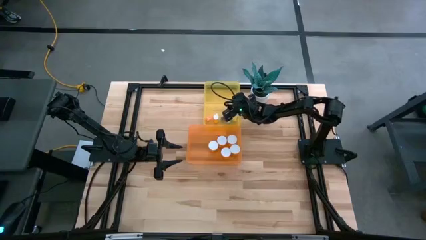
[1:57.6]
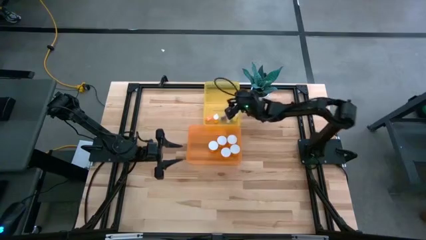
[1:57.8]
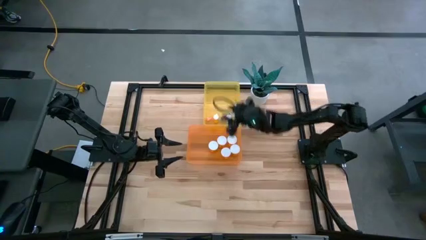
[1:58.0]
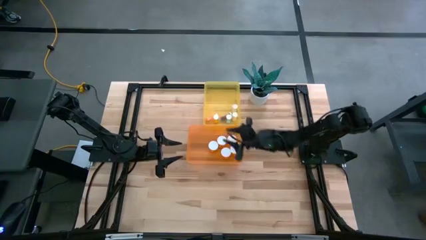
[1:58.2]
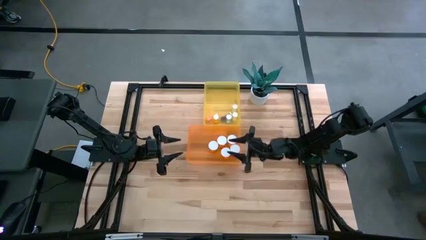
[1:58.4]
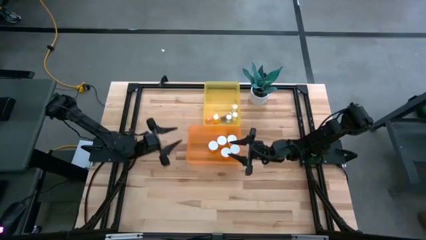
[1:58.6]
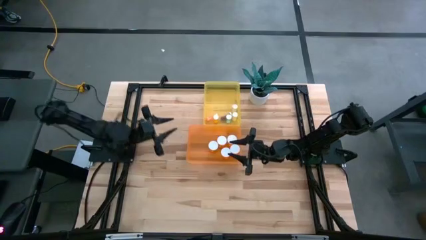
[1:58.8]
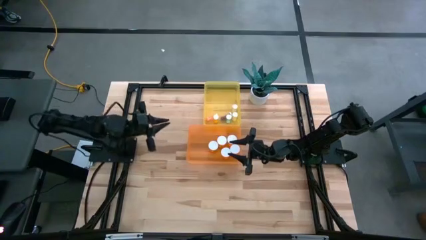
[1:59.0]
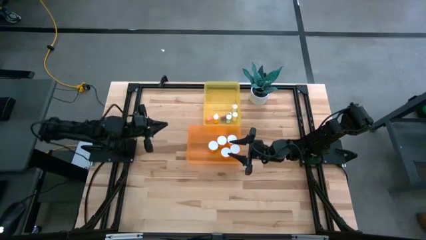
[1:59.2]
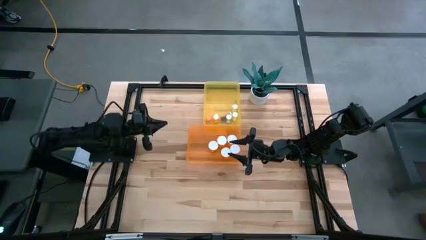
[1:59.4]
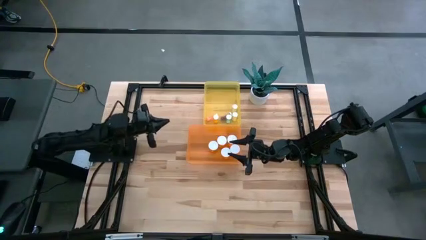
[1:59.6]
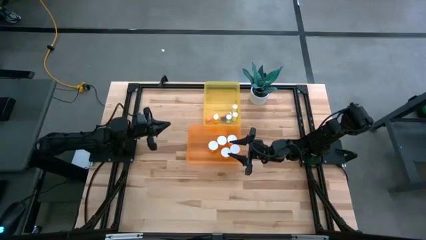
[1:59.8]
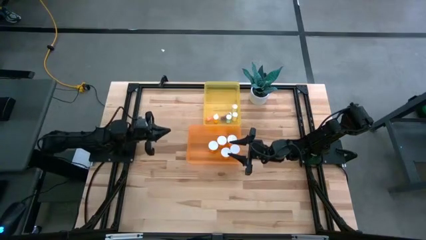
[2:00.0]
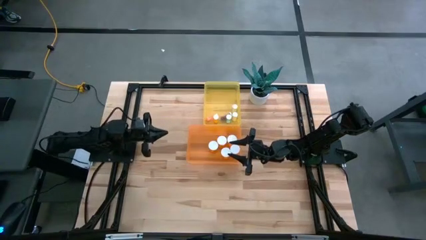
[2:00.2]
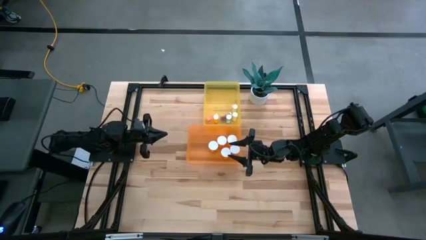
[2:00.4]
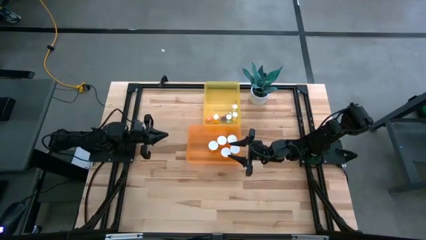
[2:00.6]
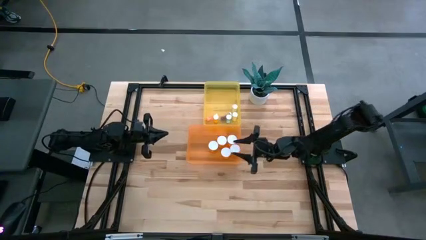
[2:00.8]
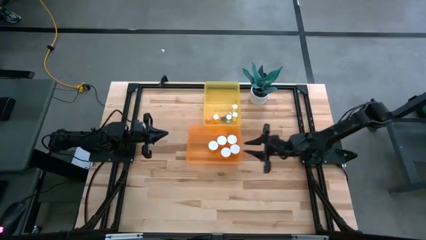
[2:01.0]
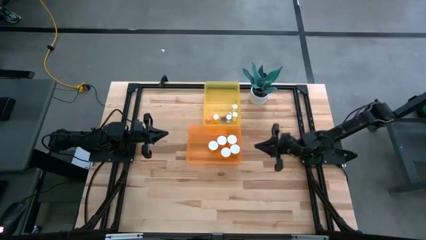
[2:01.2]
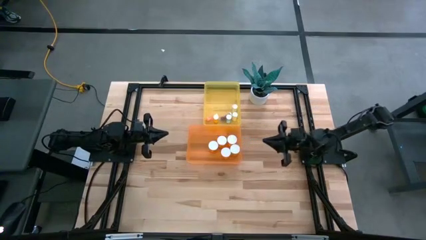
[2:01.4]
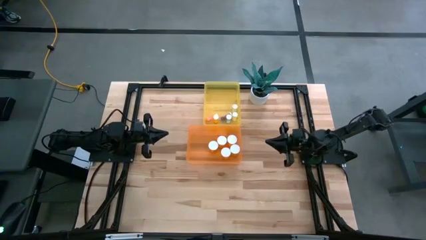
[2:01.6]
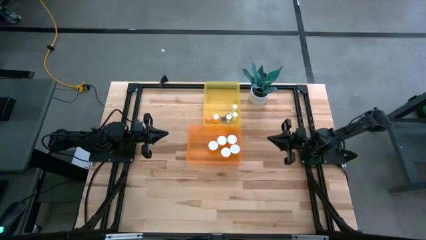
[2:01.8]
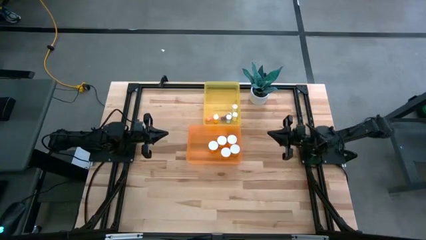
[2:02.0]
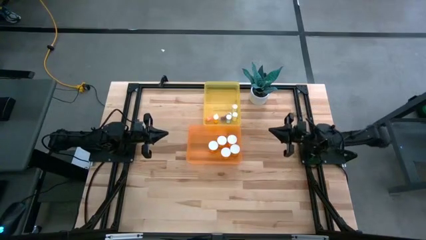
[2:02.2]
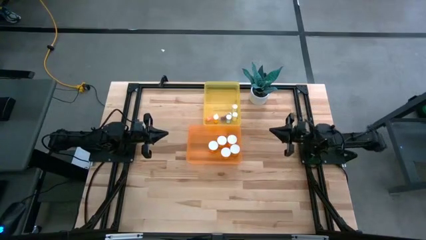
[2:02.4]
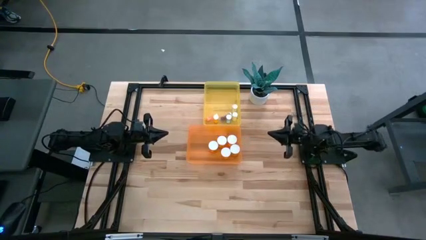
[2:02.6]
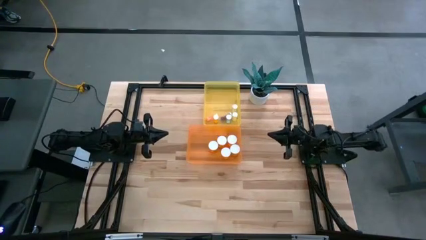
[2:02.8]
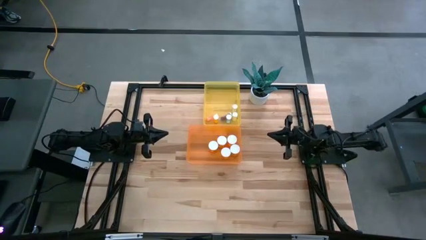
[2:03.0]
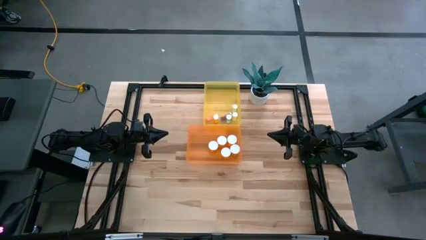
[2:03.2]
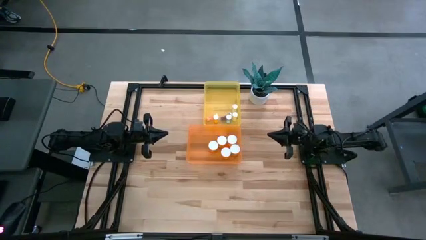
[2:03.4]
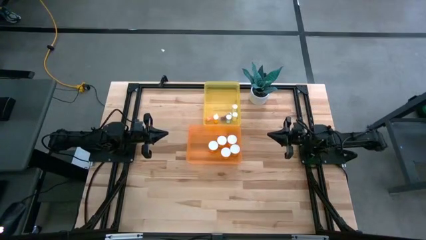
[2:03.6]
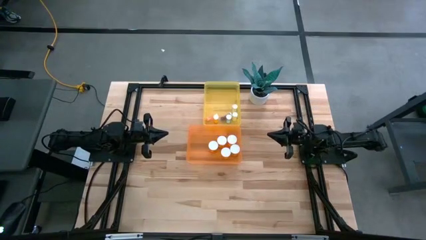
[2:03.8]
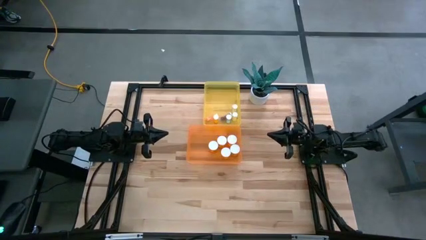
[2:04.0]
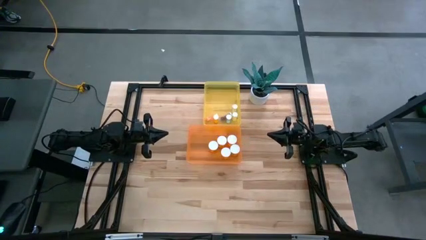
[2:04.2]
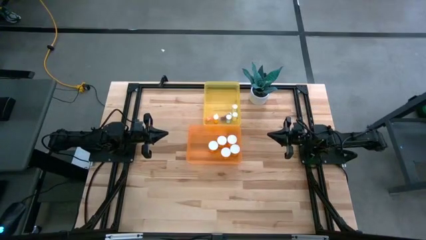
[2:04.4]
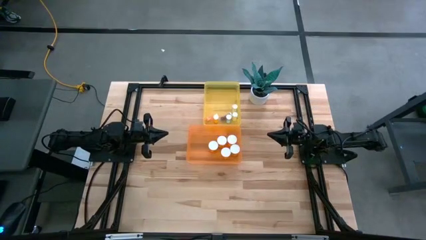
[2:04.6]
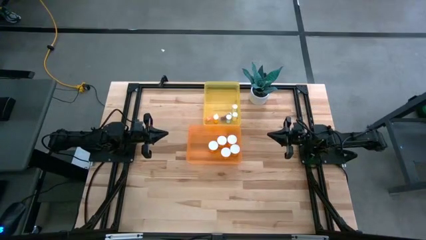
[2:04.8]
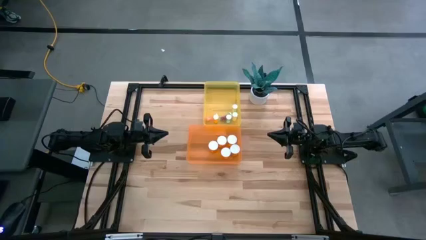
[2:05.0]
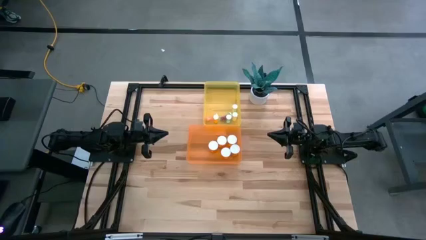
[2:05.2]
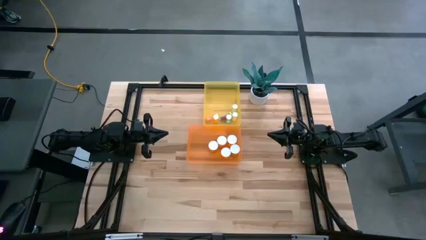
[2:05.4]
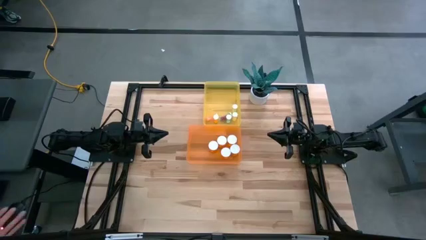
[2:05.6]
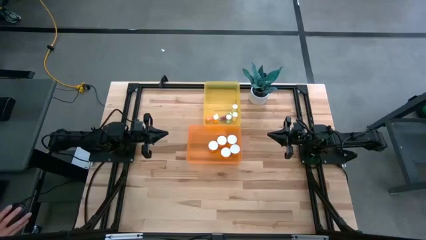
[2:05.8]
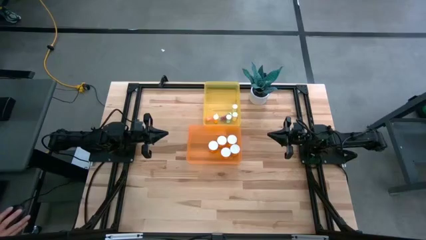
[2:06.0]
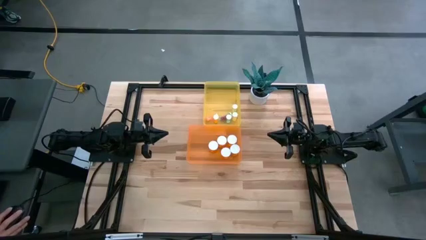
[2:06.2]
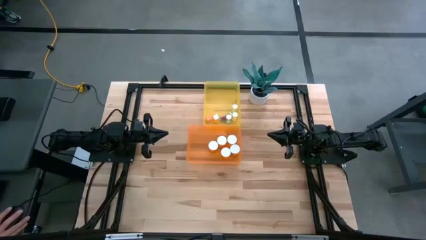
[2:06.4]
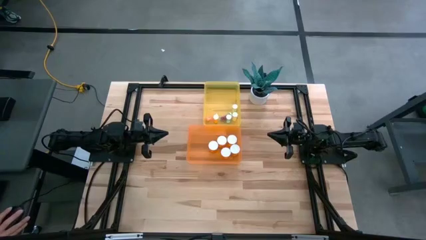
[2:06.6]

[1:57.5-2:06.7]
Task: Pick and place medicine bottles into bin by pill shape (circle, oval)
Return to Home Position

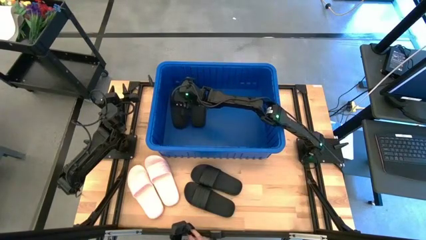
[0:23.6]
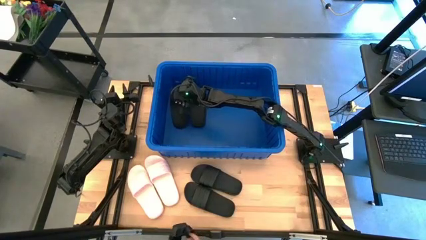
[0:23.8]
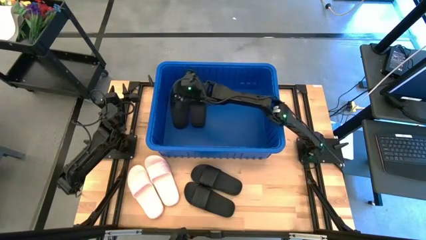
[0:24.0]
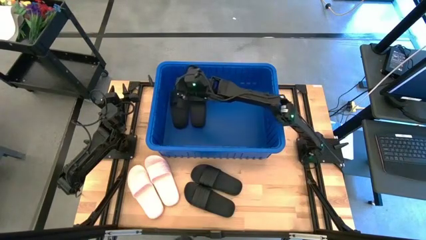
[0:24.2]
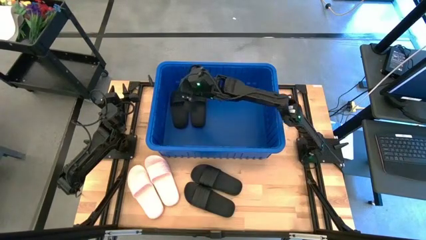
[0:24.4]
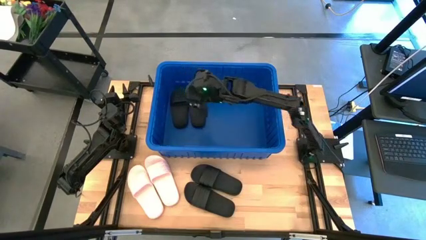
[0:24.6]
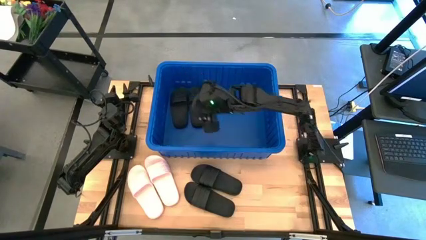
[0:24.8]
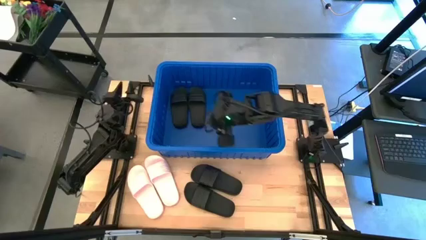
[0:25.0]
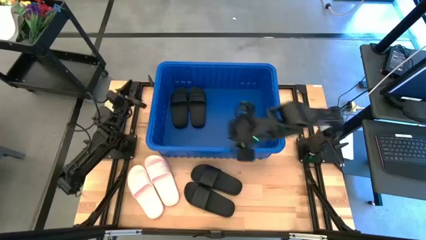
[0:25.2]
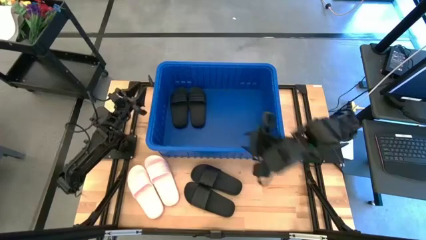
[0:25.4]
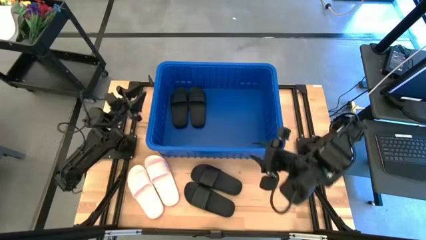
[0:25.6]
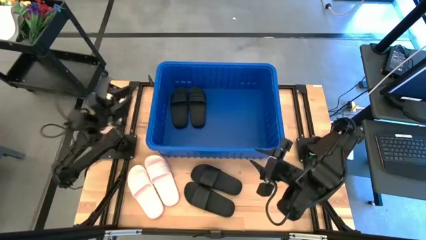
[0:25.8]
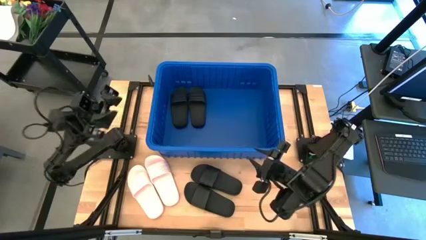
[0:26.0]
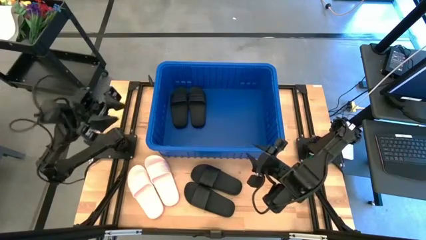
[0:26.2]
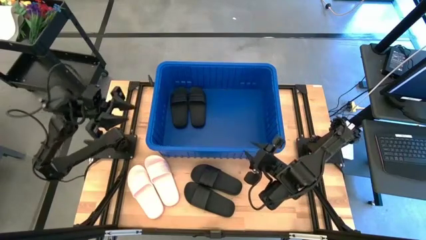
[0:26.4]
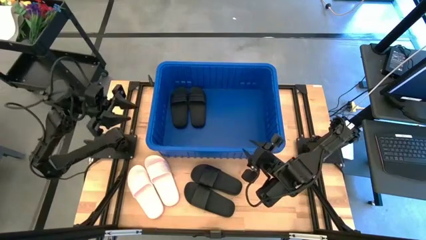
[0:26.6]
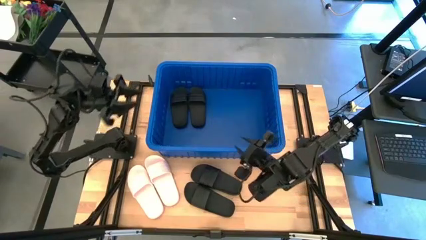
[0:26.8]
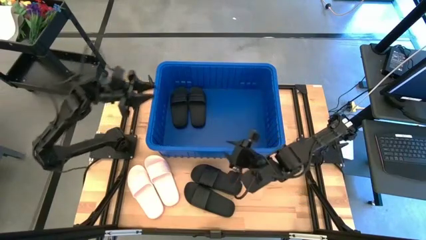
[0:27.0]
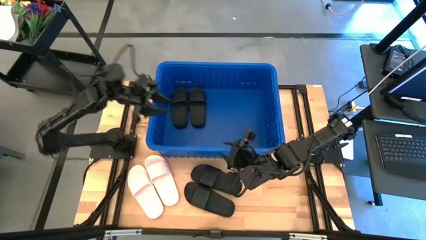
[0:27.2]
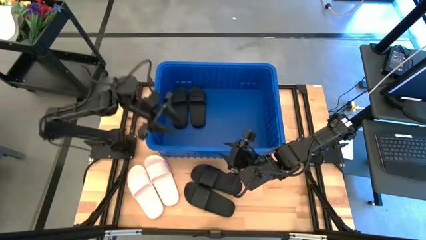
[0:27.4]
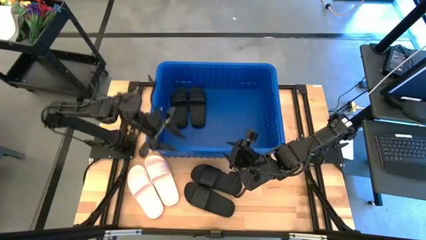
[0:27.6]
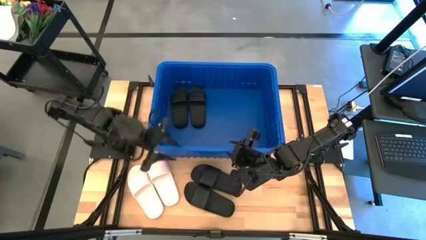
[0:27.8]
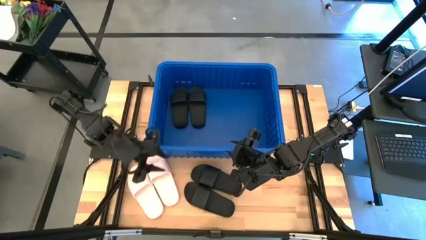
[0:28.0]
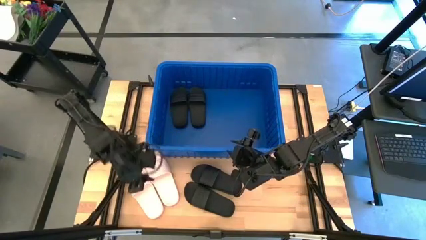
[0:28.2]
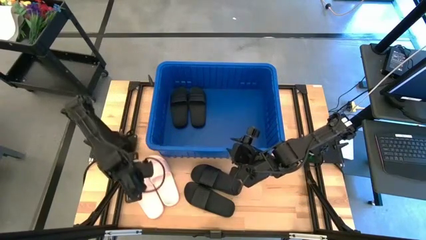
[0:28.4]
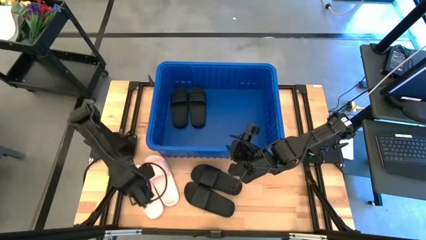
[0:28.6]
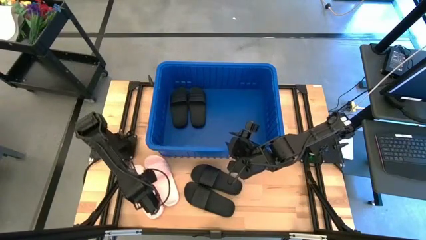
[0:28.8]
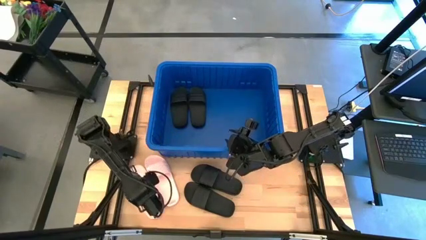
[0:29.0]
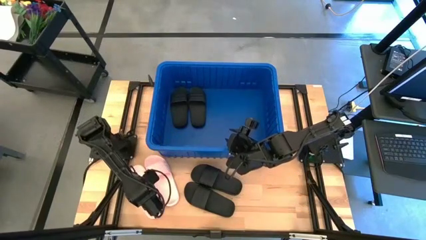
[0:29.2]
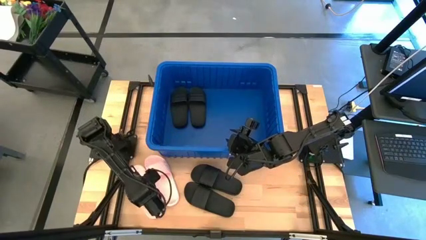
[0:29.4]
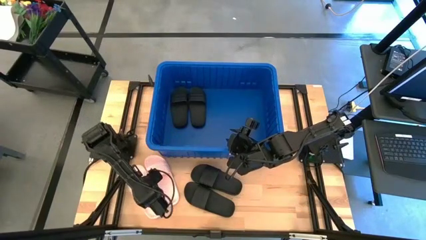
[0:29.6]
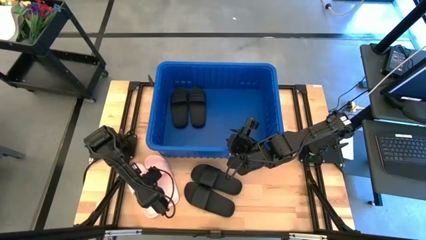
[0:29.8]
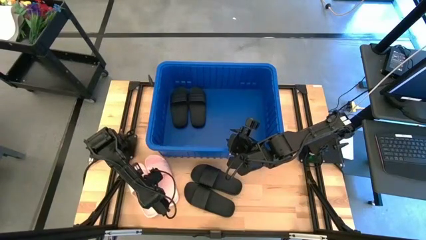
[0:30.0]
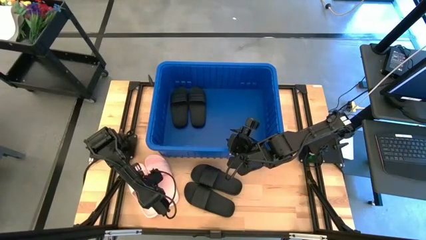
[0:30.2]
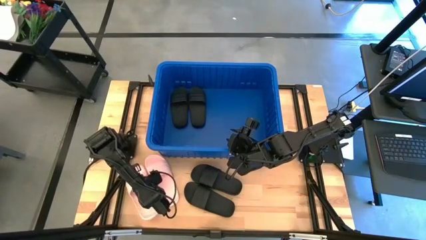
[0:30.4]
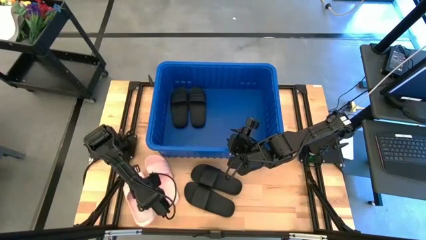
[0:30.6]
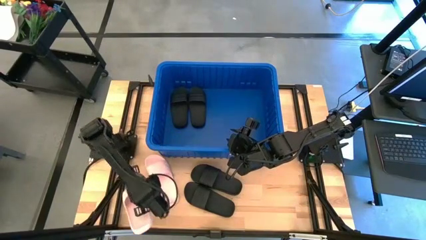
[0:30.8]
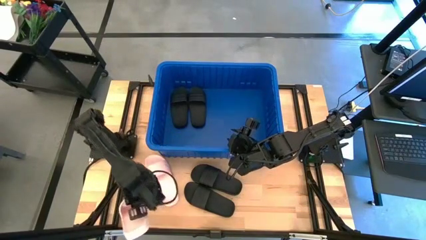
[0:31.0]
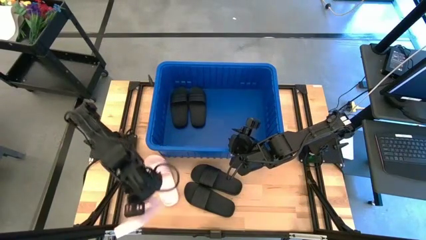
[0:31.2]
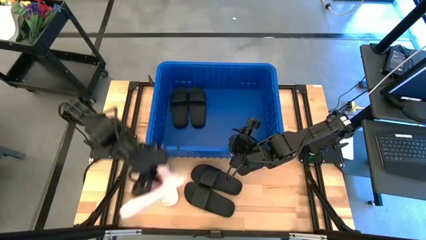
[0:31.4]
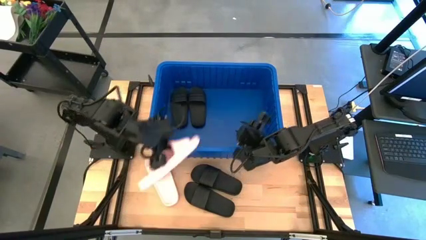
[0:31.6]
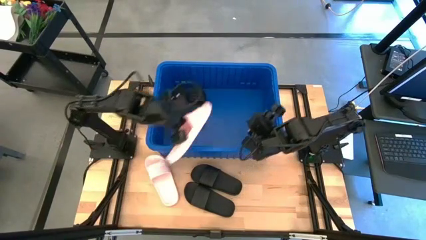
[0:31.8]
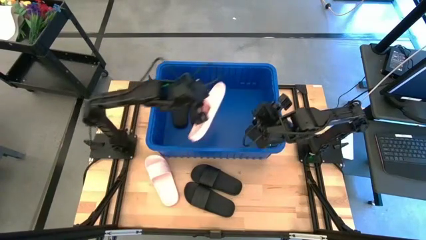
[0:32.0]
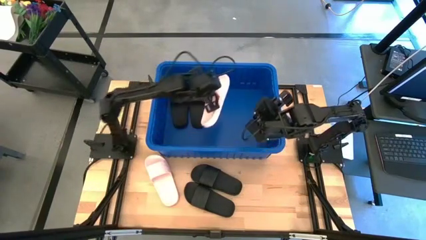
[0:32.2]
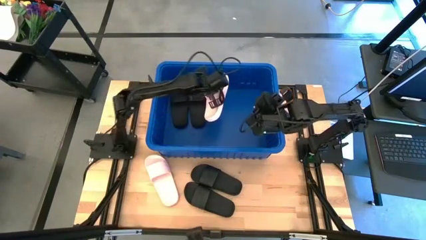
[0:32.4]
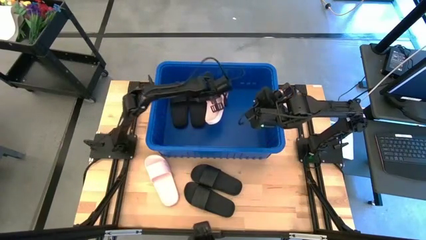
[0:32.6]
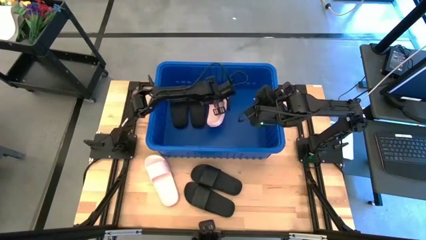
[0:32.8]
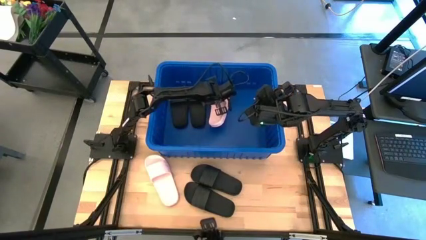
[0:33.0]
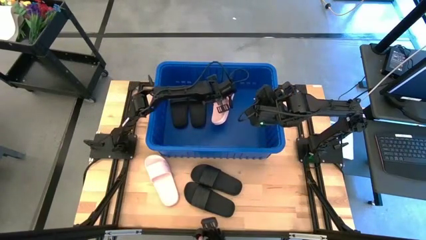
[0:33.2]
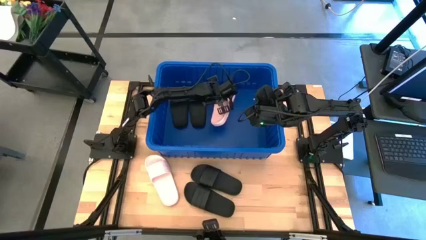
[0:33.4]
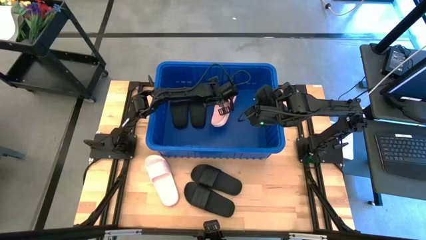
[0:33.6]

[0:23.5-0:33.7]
Task: Pick and place slides into bin
Put the pink slide into the blue bin
